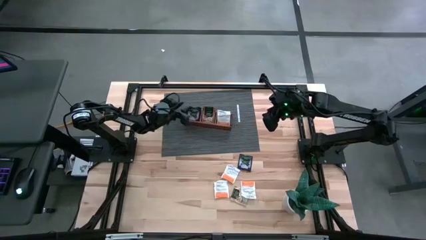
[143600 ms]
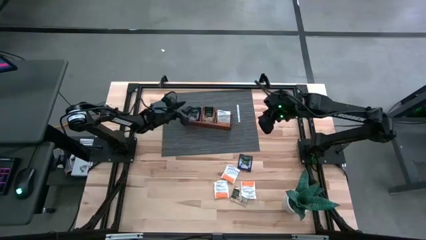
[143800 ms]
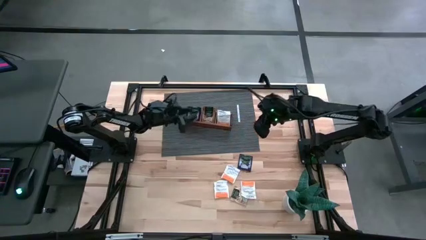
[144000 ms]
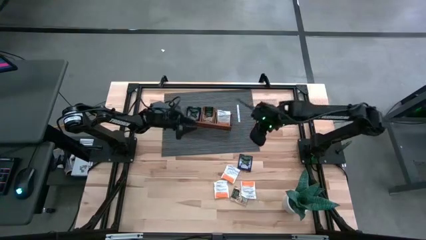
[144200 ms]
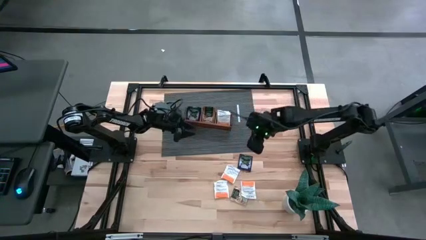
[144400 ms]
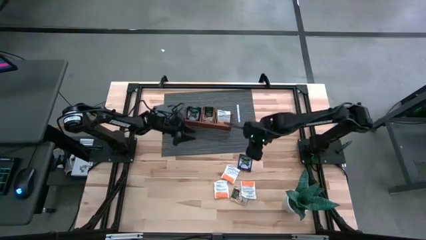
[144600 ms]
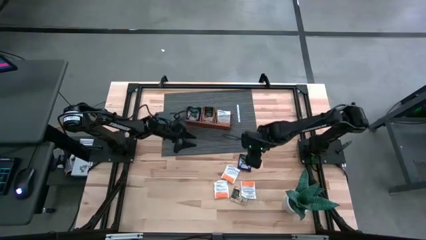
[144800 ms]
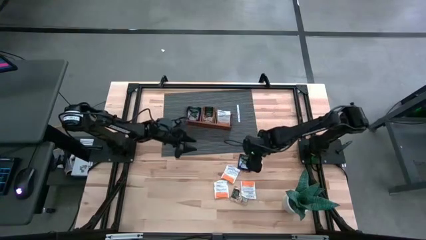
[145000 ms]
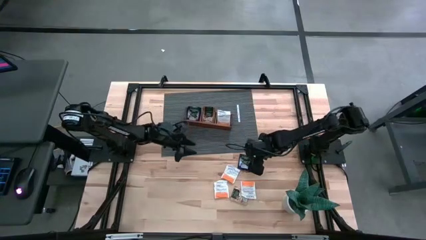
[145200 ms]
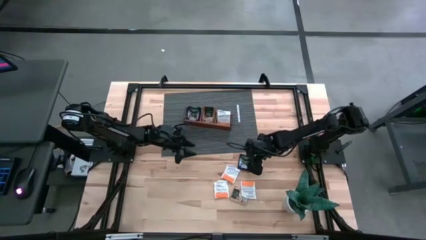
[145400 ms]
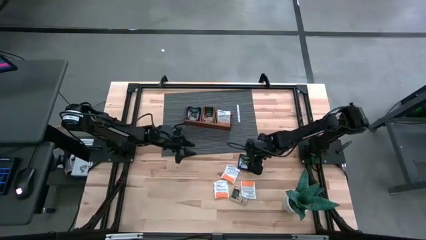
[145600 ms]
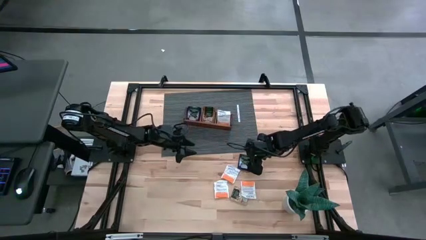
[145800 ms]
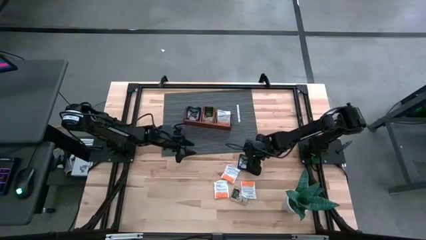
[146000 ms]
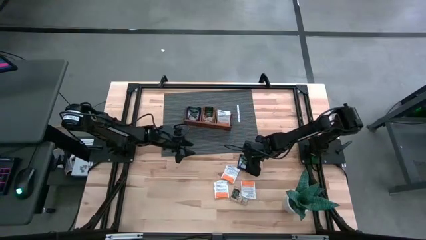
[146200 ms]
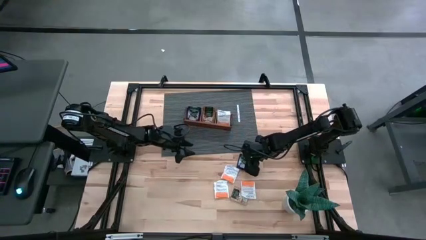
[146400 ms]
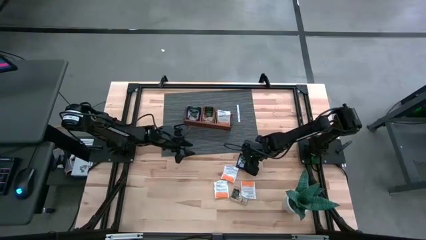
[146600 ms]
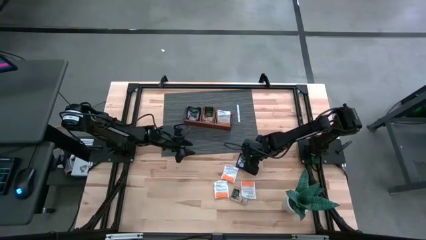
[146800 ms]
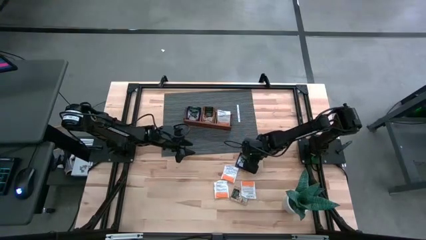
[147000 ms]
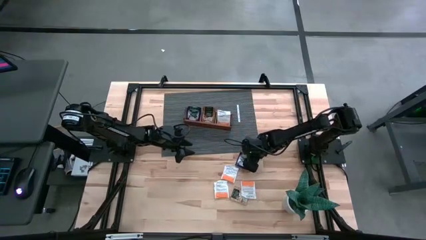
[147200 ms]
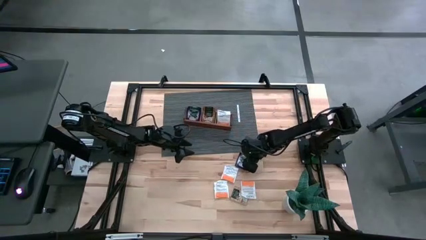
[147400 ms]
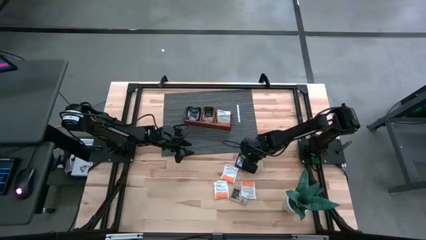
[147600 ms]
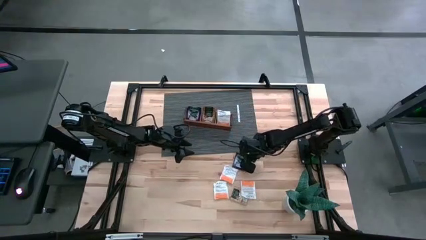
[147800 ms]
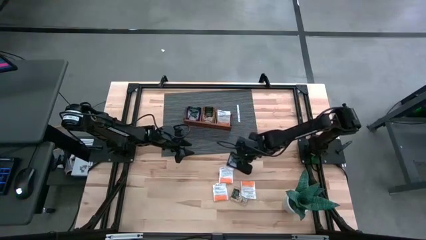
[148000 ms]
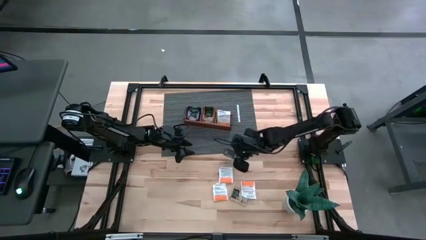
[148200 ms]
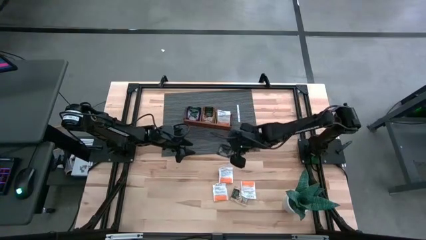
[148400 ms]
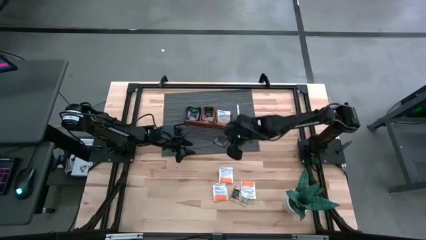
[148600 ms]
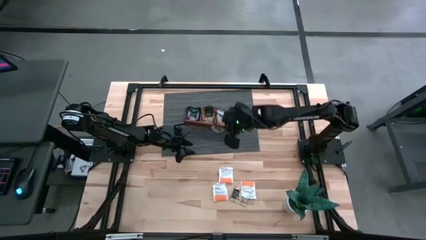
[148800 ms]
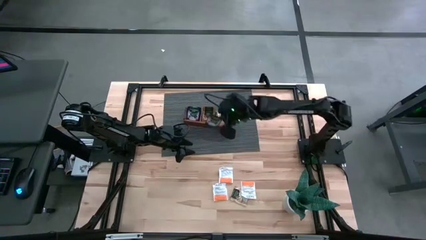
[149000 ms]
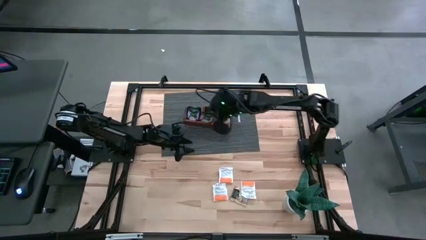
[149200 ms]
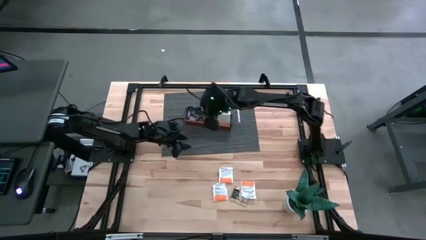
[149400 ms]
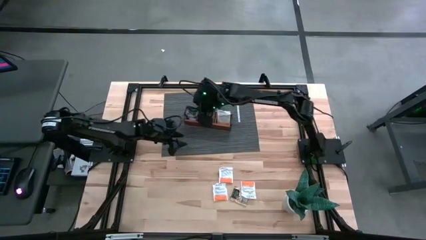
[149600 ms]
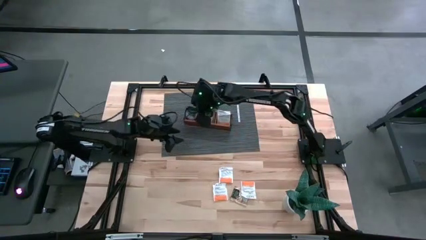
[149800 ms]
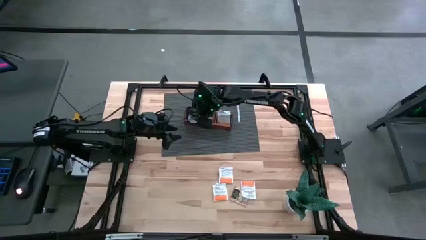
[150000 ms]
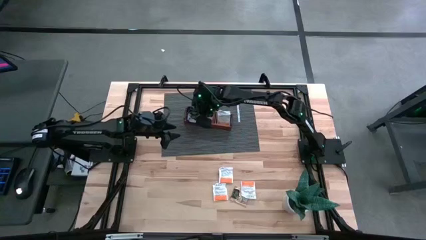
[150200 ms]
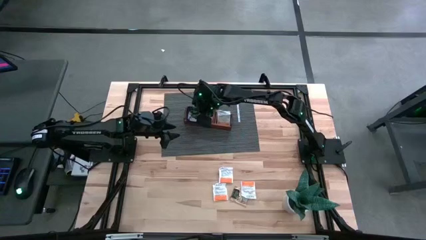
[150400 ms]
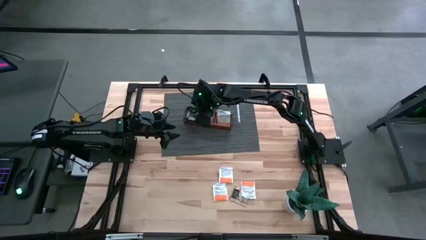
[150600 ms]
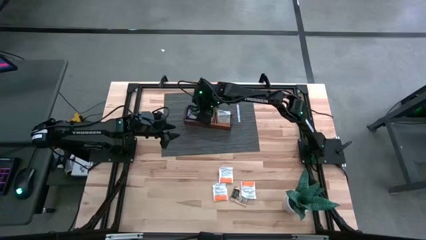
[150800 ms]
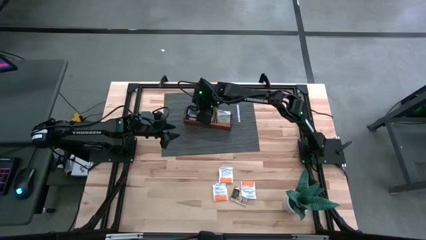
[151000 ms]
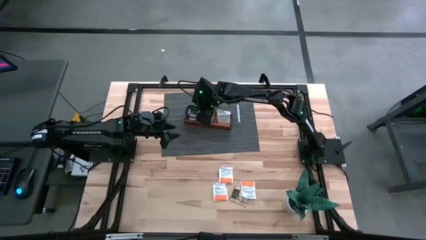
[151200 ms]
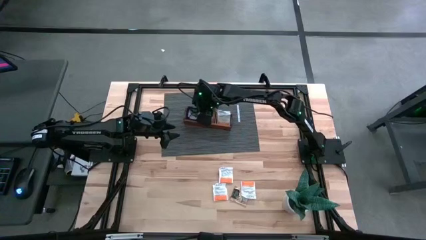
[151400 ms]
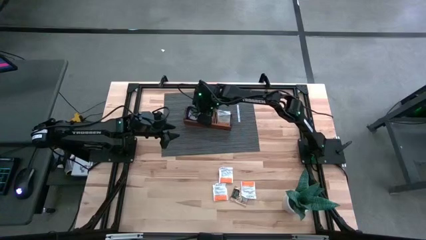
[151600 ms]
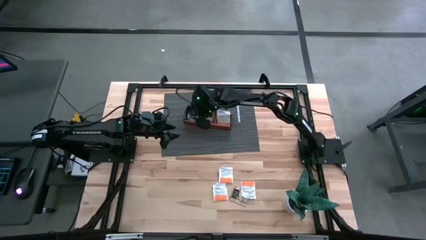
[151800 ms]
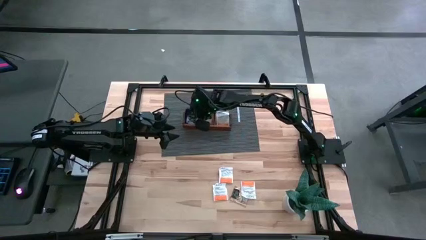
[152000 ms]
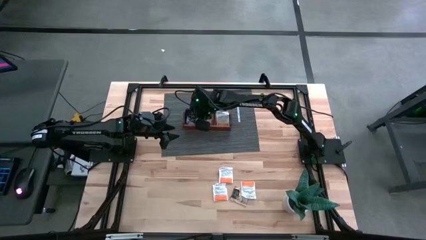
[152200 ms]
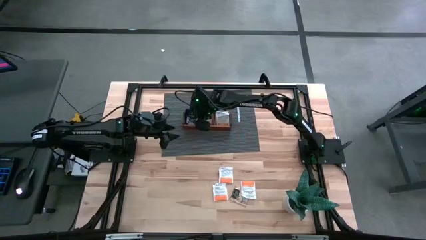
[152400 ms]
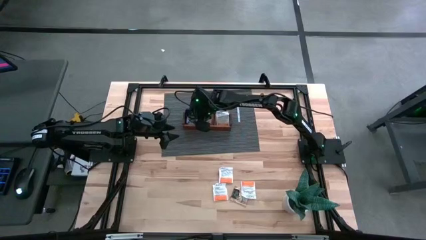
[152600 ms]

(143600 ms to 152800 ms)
Task: Pick & Place Tea
Put the violet tea bag into the left section of the wooden organizer

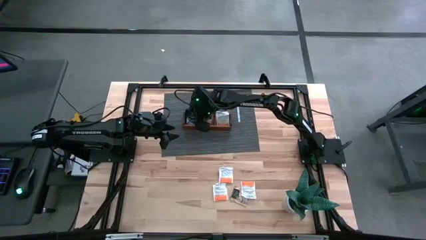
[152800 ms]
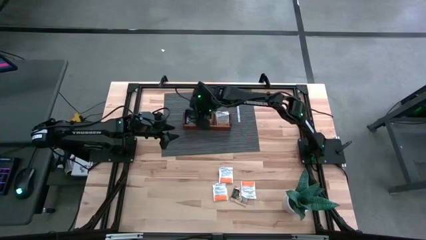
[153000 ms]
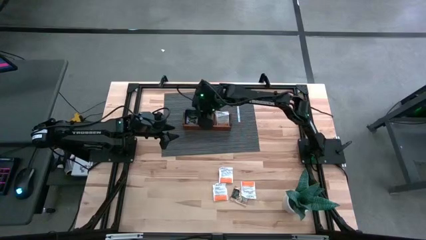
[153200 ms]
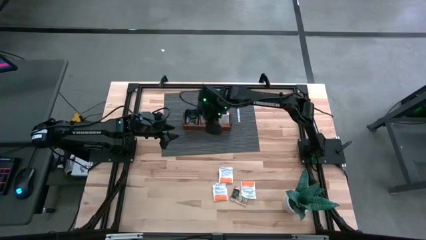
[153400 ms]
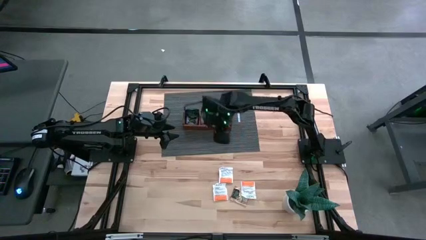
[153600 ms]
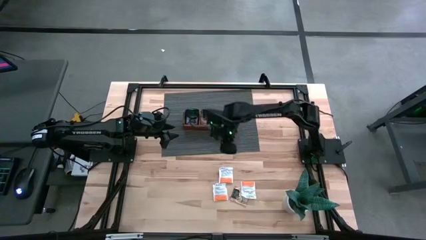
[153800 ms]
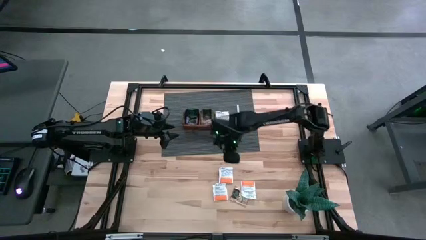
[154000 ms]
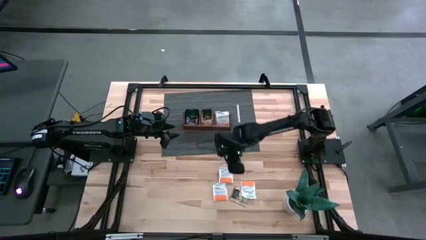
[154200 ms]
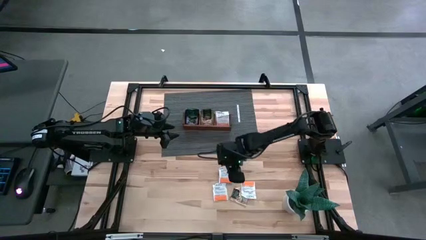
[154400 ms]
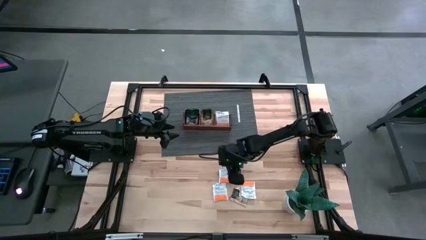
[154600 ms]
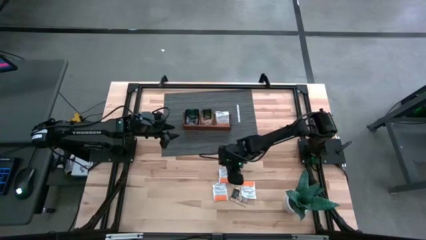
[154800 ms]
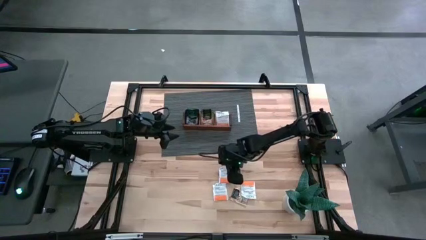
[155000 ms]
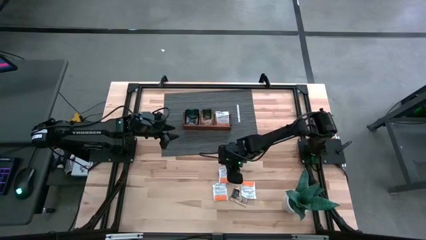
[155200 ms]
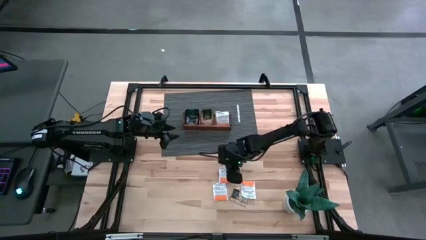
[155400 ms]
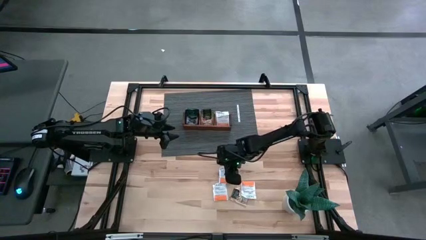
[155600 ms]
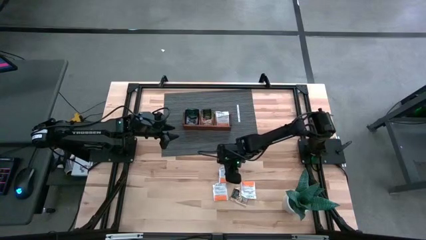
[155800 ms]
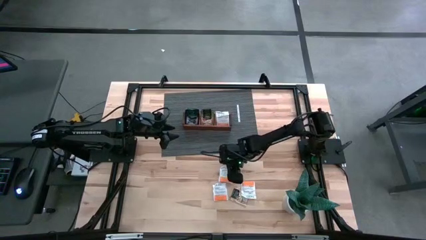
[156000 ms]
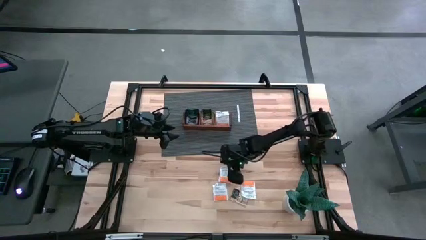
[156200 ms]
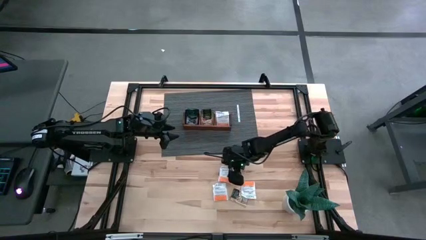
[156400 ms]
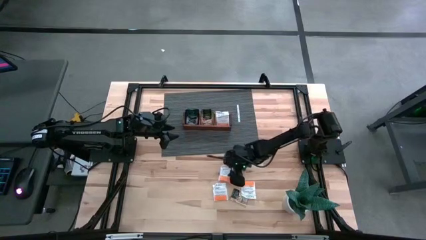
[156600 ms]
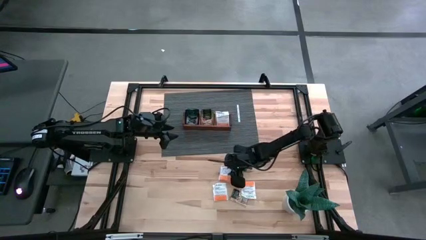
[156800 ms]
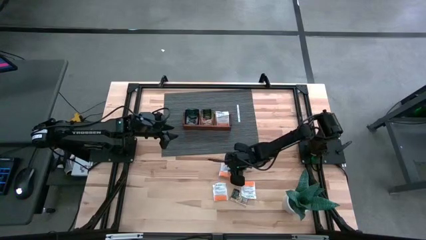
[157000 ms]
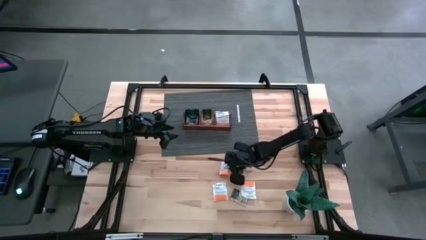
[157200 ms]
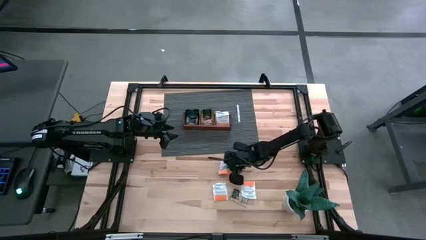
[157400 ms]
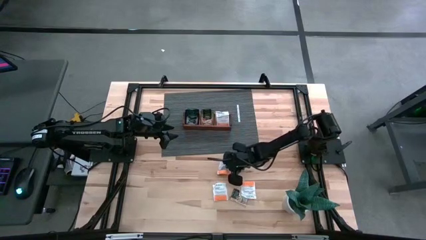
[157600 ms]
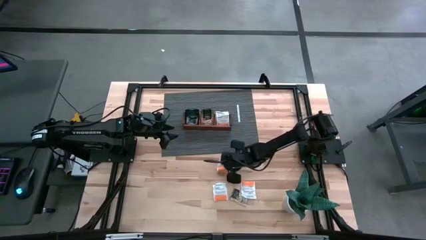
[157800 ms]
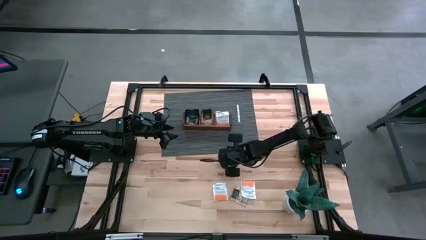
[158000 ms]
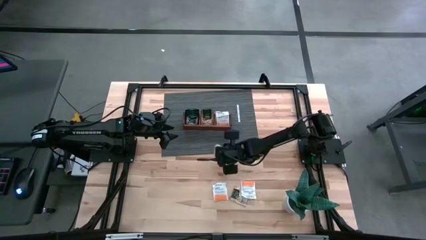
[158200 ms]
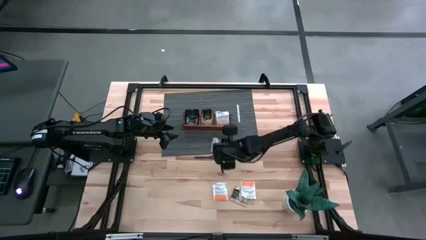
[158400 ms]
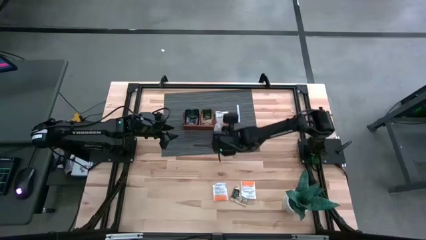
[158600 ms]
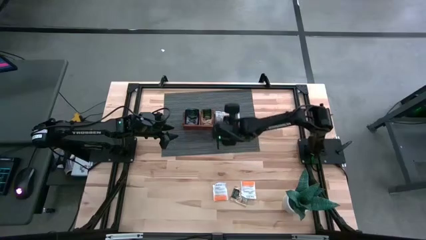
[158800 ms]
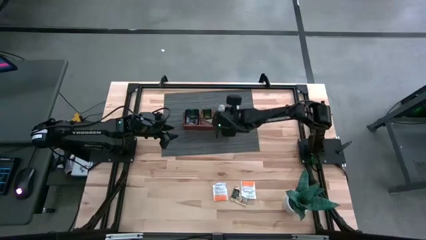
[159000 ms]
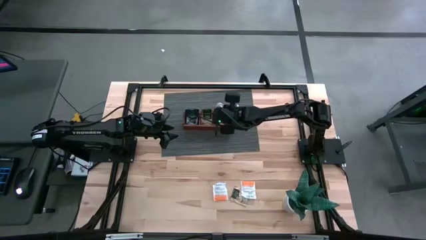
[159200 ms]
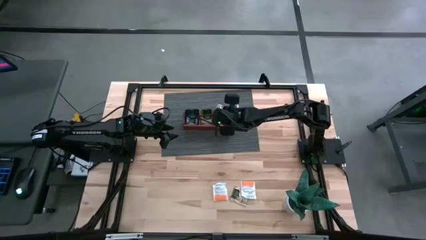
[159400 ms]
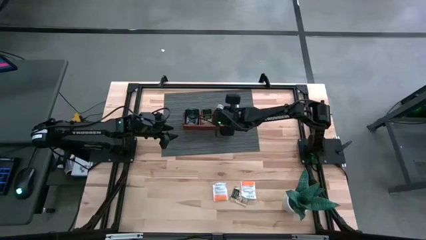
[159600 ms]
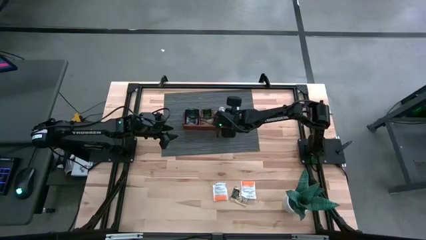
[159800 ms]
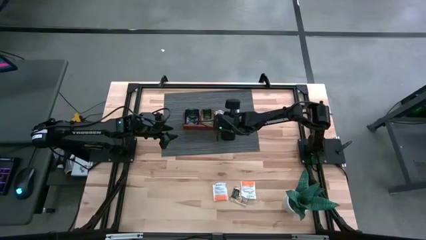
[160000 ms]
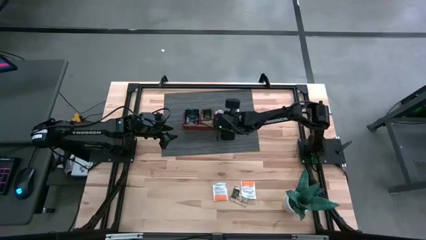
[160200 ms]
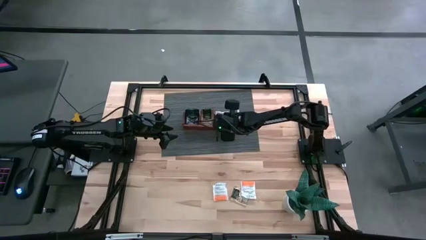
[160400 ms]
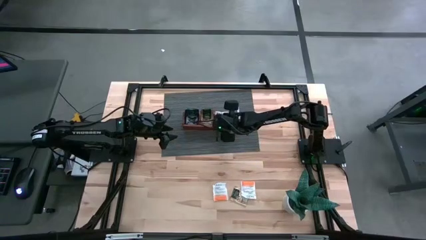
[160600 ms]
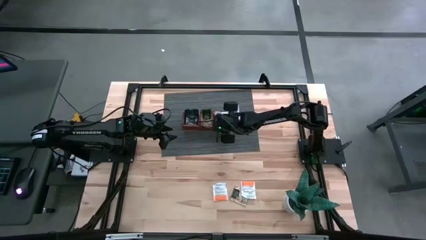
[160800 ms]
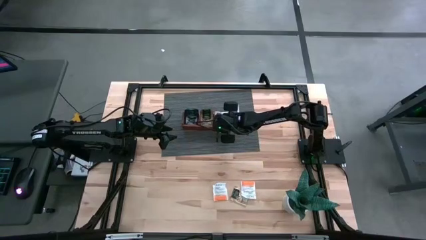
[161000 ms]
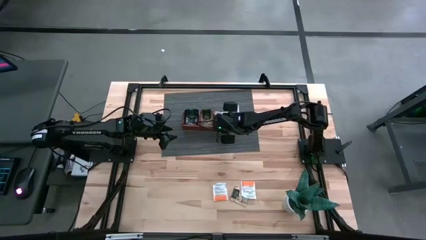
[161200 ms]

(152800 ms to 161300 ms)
Put the orange tea bag into the right section of the wooden organizer
